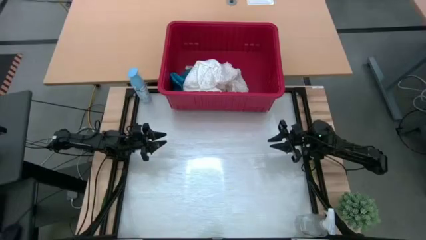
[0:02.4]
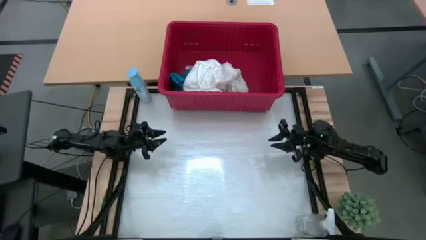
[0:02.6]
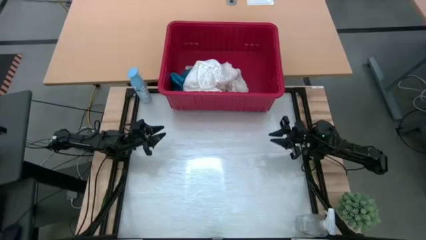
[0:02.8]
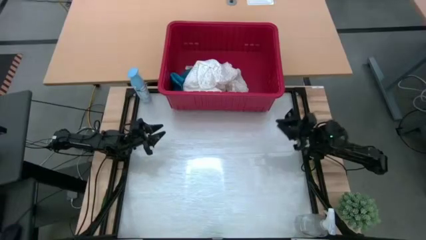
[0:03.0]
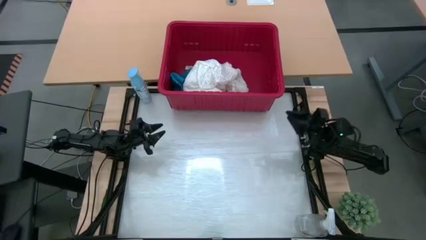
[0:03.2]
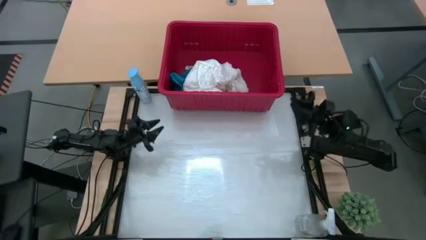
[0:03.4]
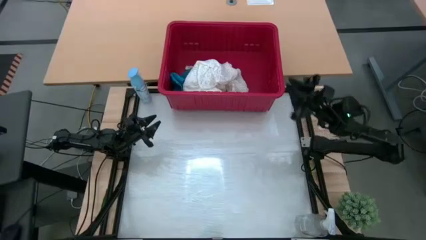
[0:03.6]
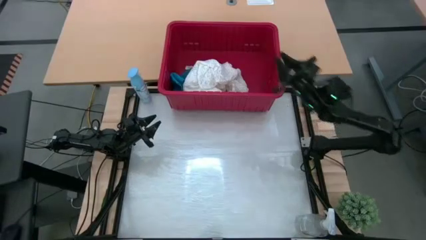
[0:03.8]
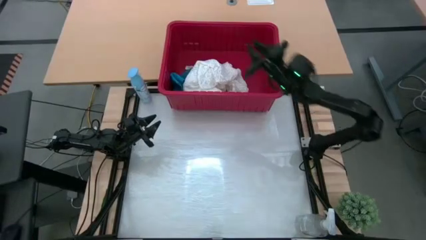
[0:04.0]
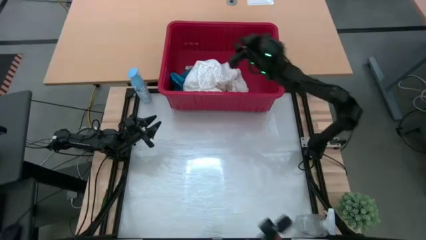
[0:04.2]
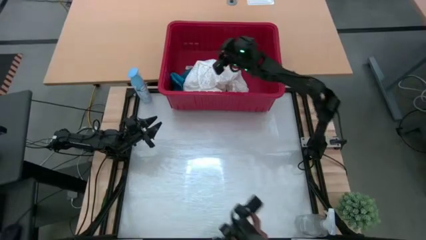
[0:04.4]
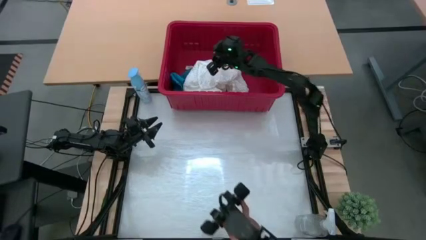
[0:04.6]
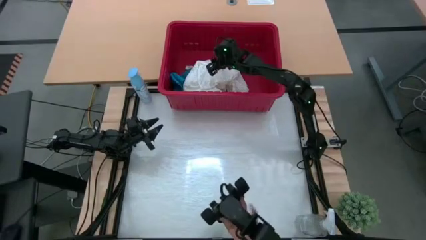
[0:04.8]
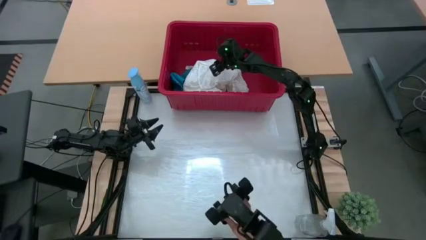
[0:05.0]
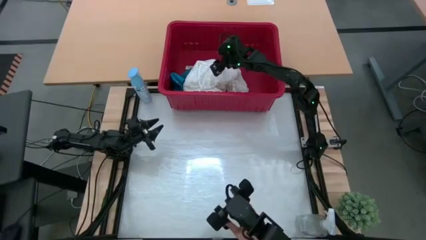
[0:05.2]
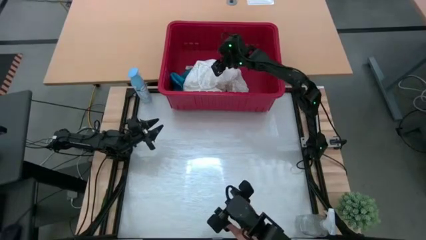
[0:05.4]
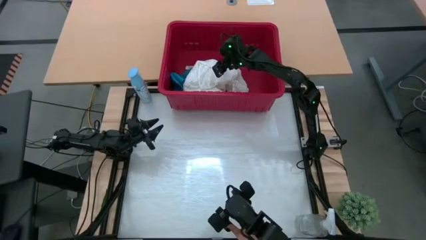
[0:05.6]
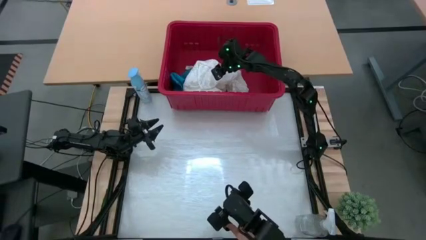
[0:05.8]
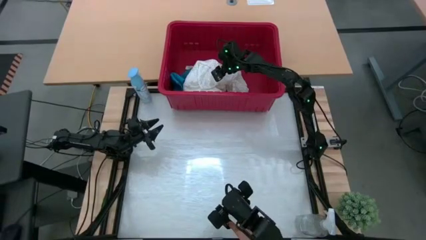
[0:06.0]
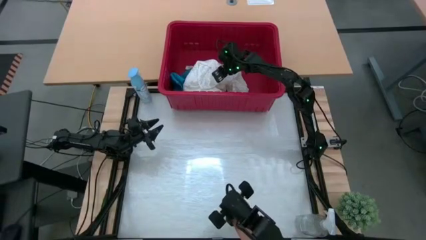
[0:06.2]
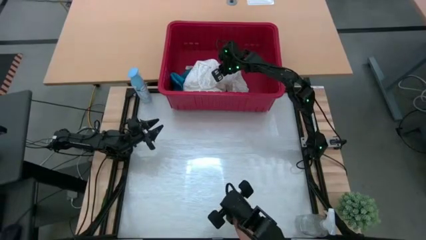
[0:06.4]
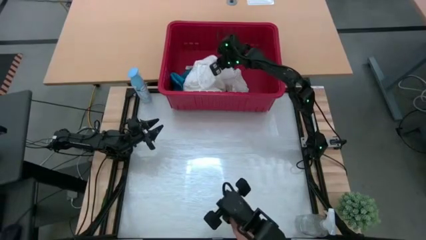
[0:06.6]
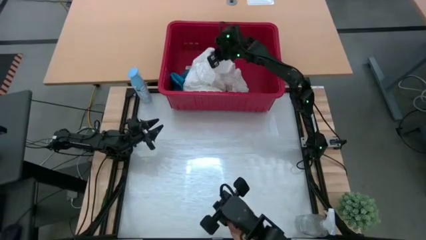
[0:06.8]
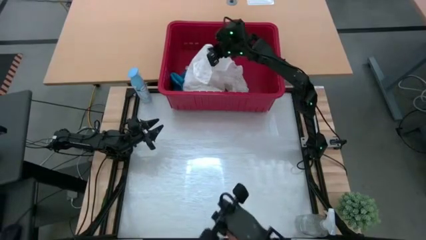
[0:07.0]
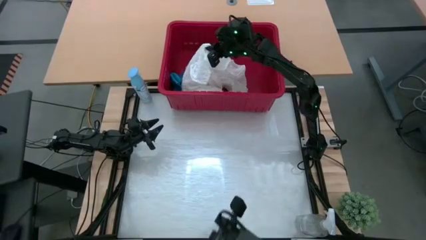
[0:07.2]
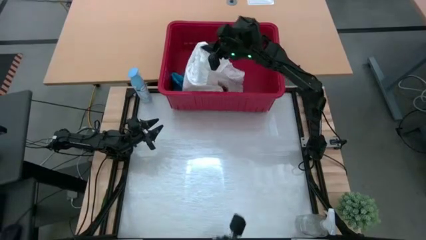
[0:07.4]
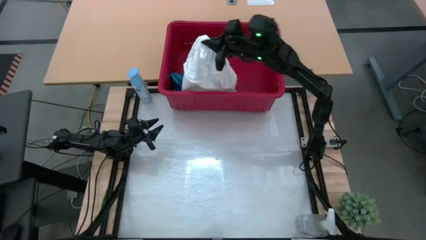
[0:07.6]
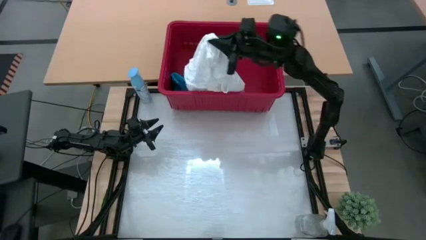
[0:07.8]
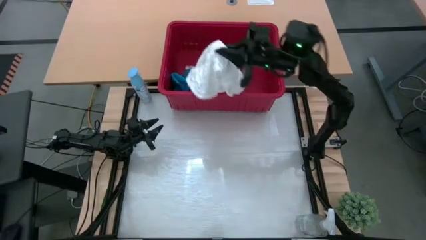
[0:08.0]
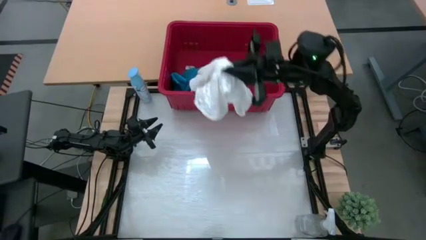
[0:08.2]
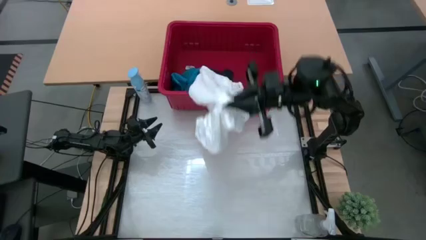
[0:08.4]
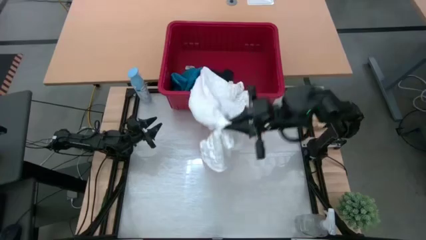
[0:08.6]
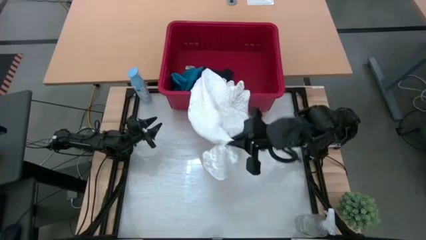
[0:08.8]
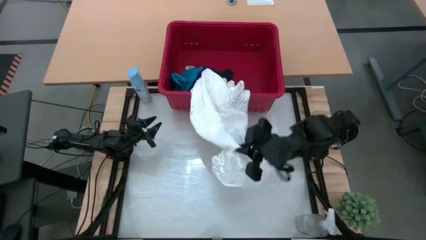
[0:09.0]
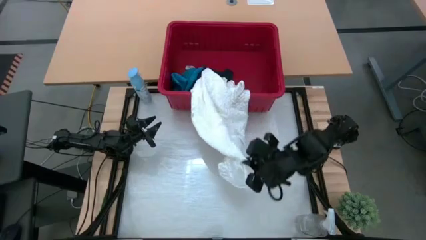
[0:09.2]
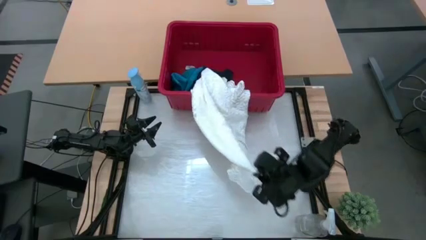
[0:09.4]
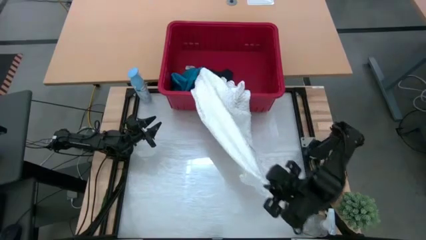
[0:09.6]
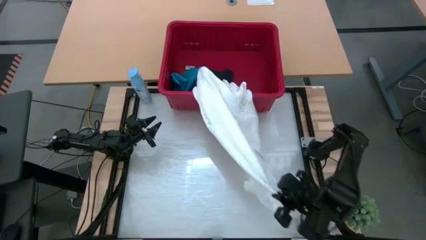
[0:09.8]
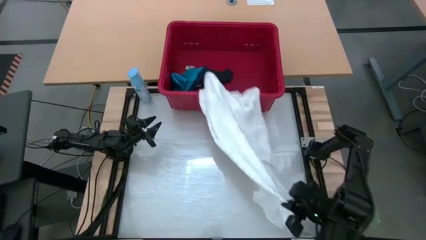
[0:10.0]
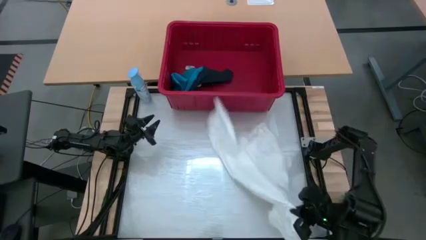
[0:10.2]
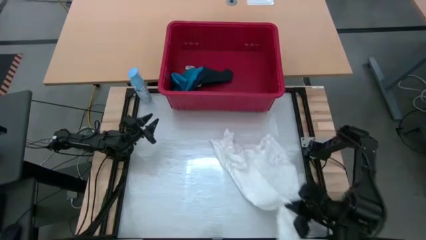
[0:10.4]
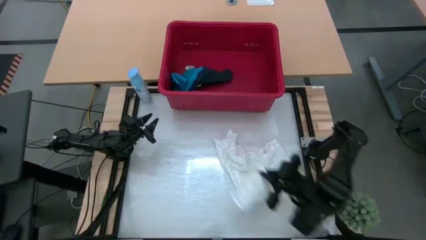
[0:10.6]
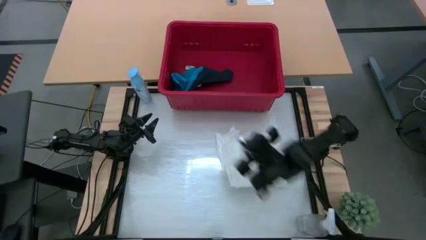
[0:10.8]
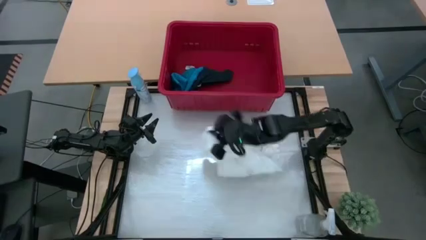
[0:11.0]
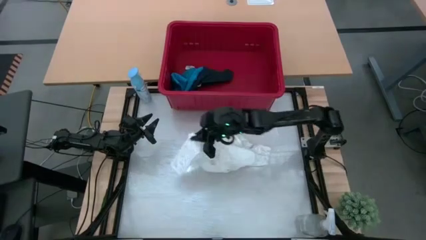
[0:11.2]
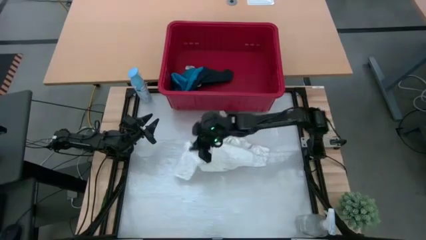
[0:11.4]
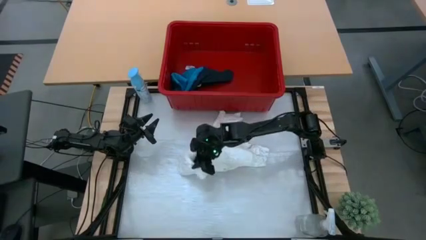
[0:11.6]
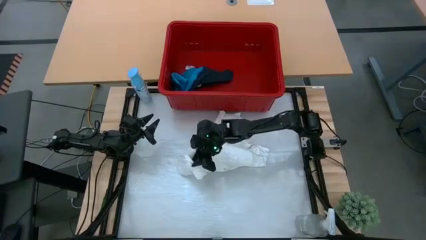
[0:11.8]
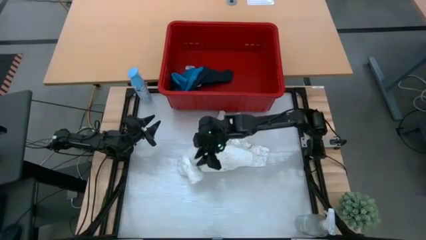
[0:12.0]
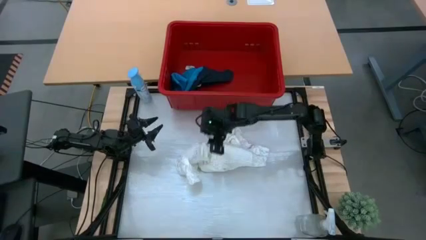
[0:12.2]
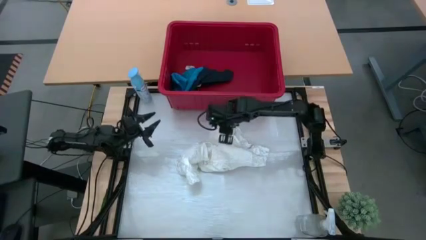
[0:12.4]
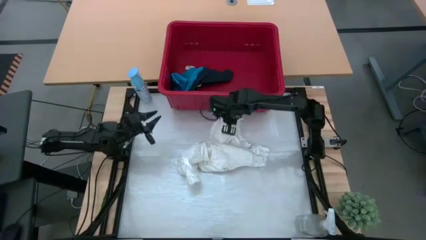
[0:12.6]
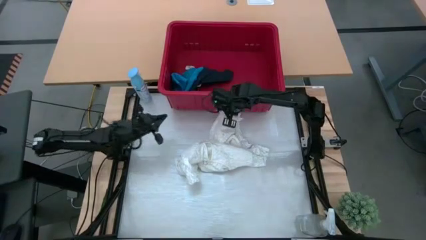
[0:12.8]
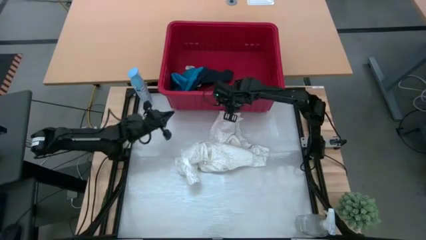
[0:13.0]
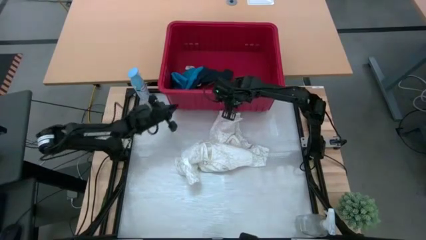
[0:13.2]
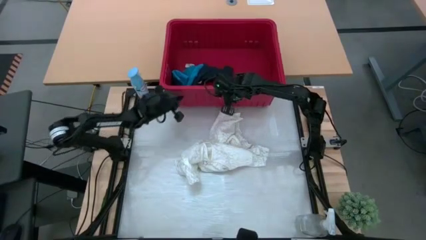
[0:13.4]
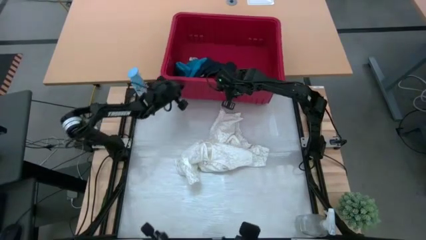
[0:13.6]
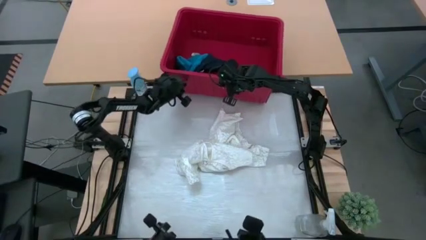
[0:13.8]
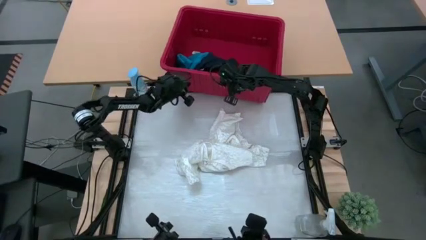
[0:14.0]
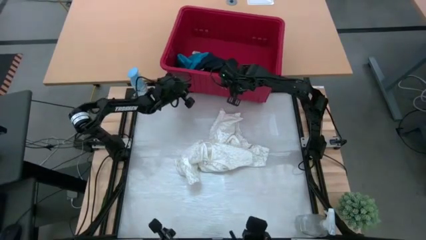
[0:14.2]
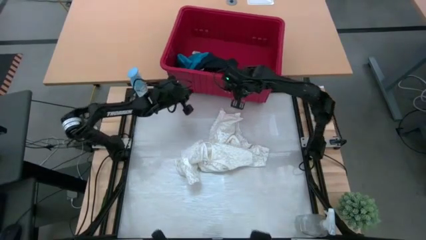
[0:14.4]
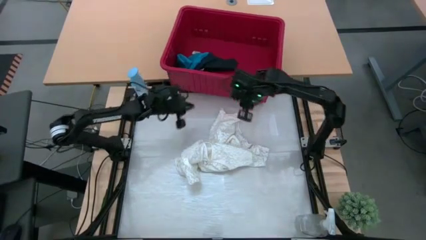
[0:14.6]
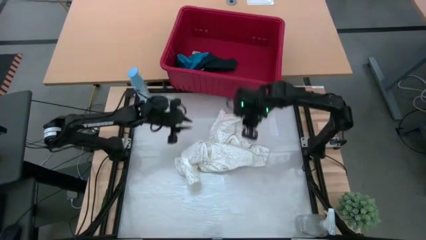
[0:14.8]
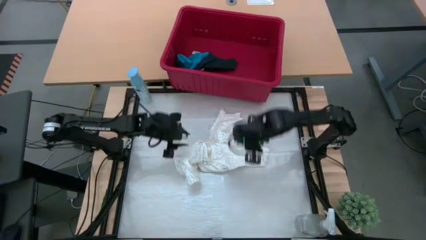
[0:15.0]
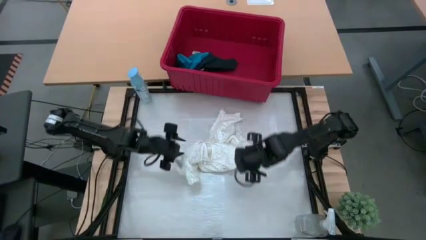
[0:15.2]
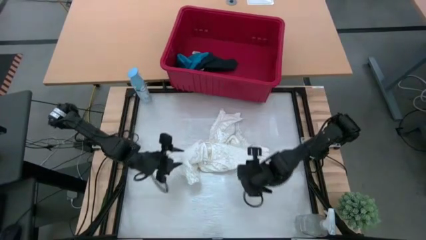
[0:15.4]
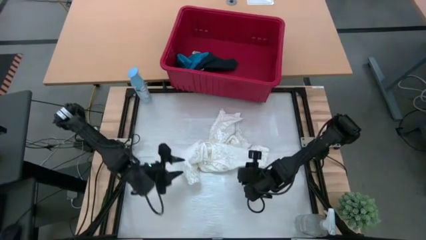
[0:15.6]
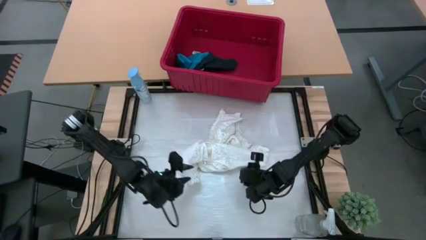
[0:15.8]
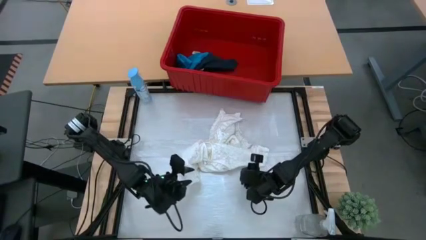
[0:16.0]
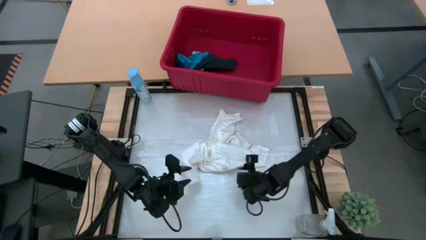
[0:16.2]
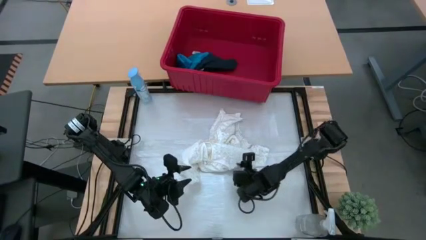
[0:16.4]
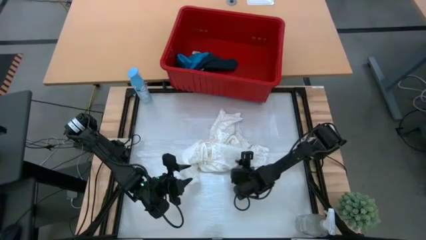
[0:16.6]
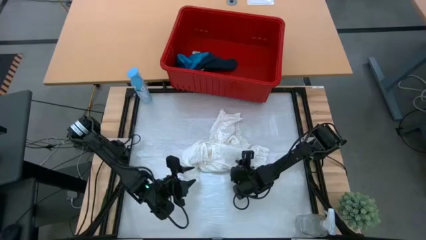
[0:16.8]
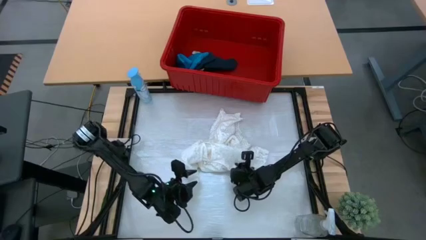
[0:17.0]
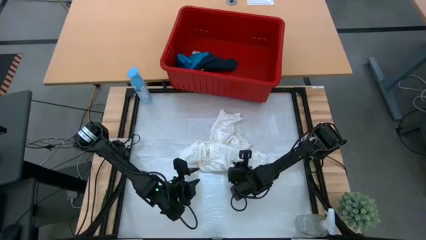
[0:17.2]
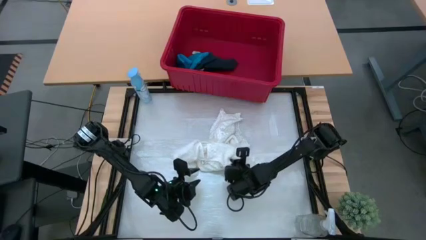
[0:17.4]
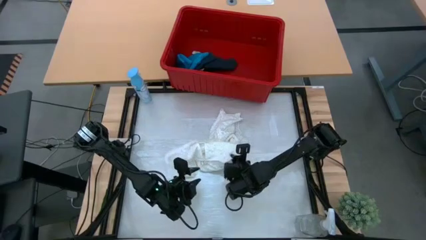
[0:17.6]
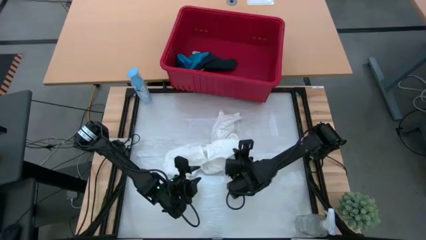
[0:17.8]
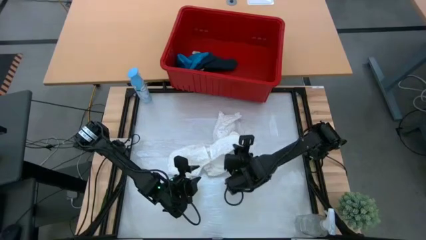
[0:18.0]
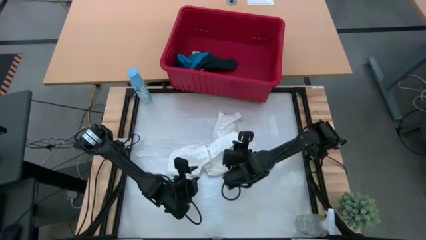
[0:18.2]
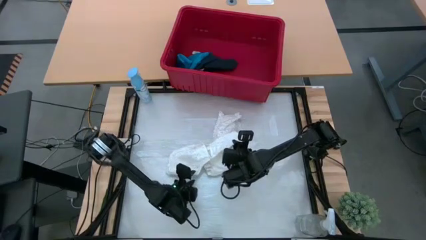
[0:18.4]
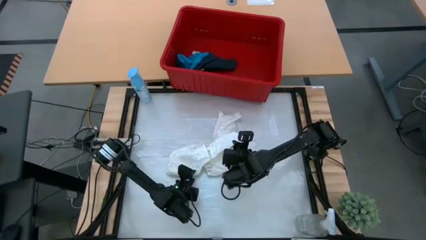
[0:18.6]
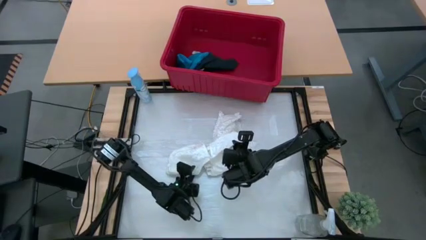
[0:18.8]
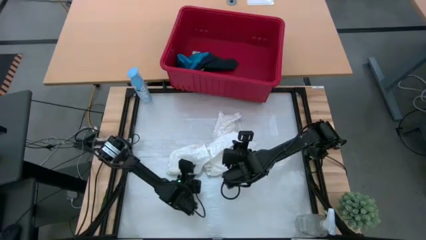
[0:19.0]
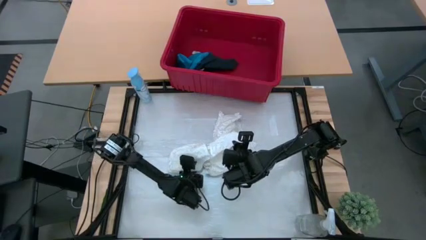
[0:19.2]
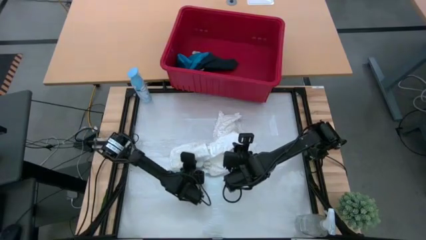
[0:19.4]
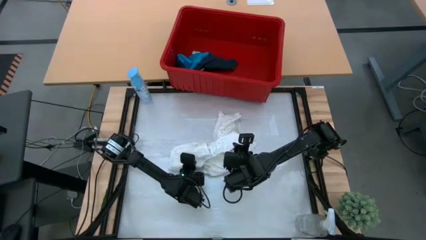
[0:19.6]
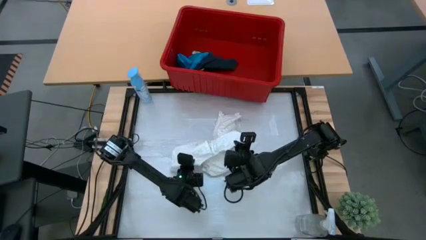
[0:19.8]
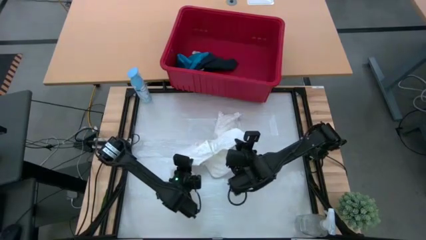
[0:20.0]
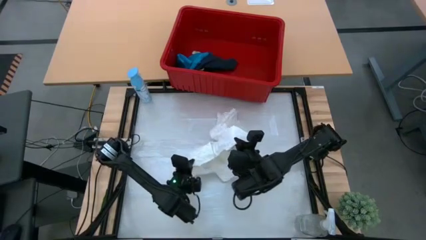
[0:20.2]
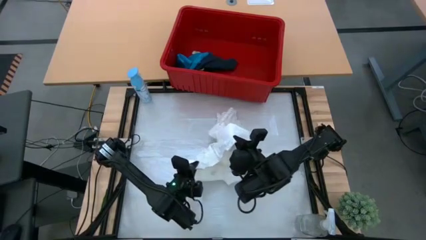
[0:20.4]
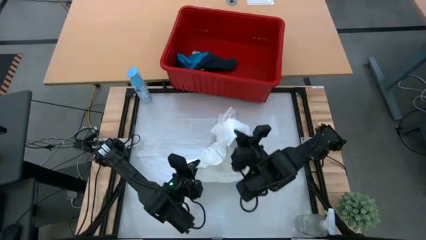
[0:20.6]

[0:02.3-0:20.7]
Task: Fold Laundry from Bin
Fold the white shirt
